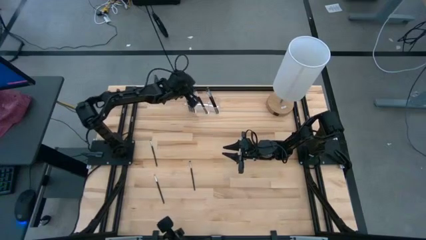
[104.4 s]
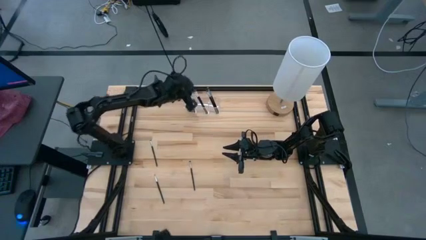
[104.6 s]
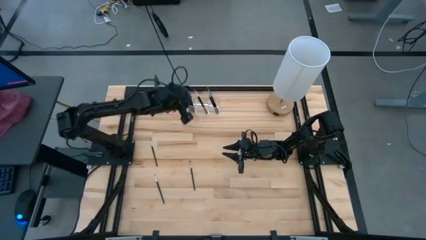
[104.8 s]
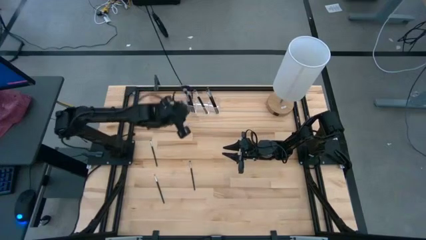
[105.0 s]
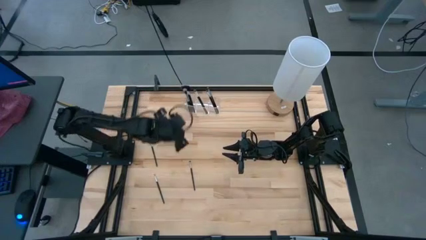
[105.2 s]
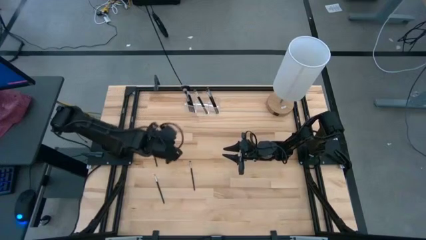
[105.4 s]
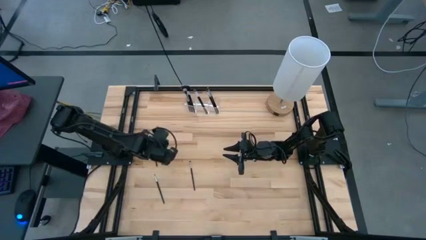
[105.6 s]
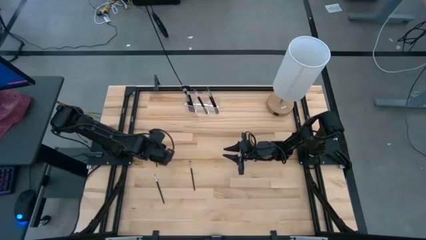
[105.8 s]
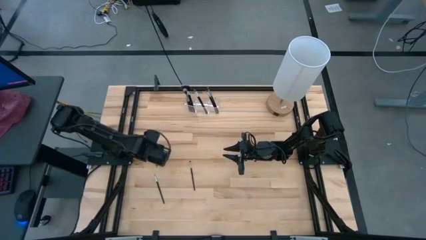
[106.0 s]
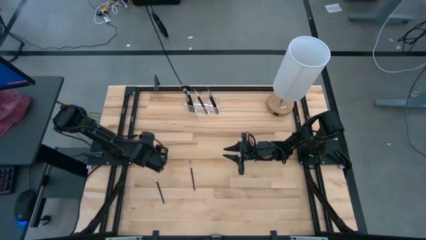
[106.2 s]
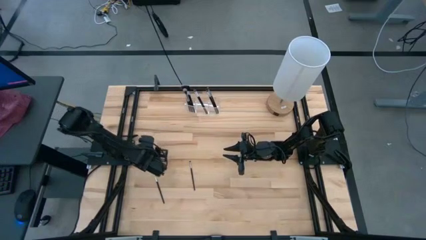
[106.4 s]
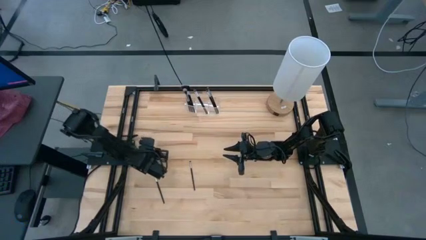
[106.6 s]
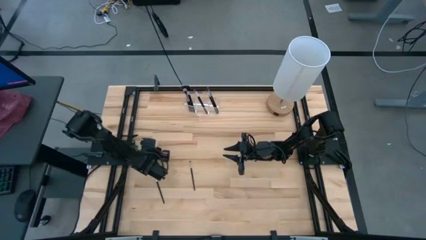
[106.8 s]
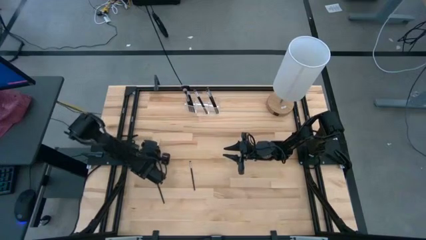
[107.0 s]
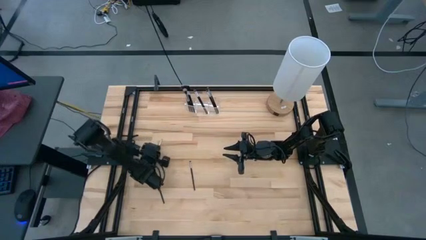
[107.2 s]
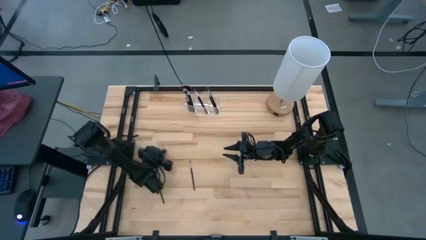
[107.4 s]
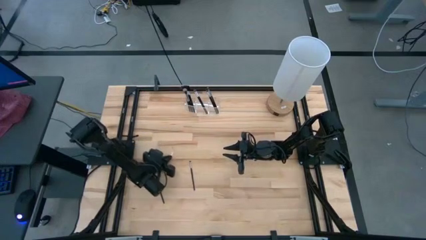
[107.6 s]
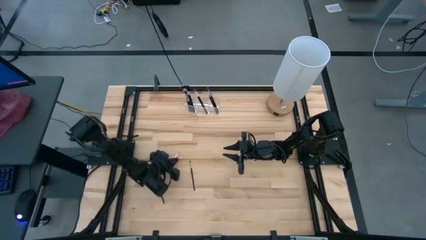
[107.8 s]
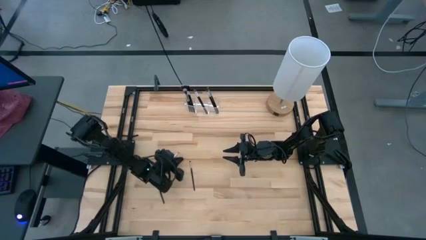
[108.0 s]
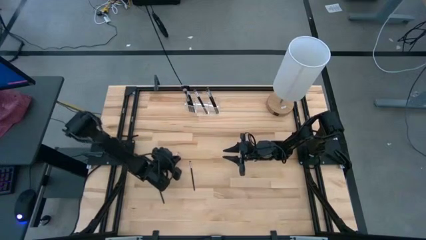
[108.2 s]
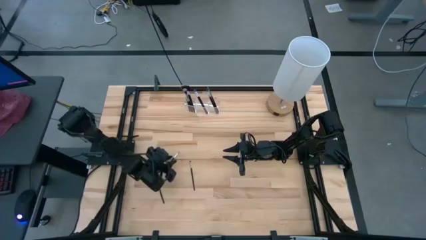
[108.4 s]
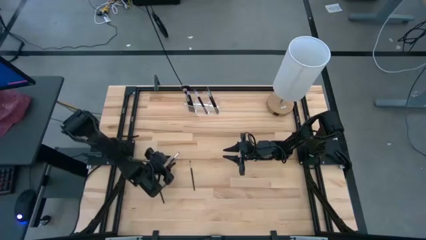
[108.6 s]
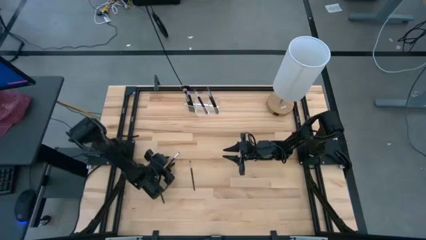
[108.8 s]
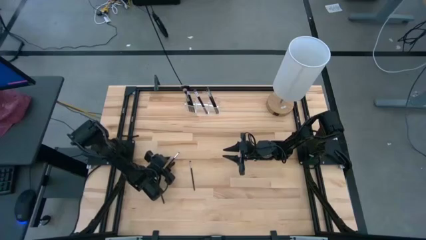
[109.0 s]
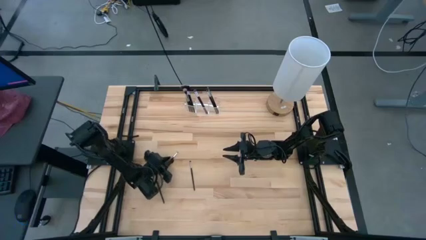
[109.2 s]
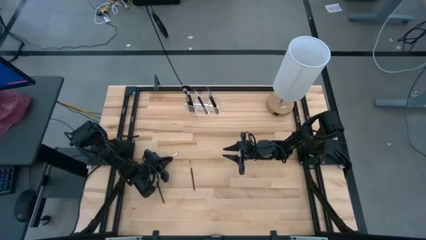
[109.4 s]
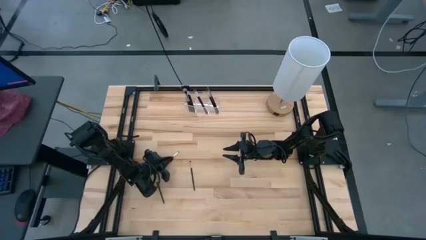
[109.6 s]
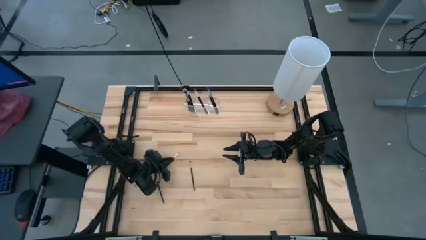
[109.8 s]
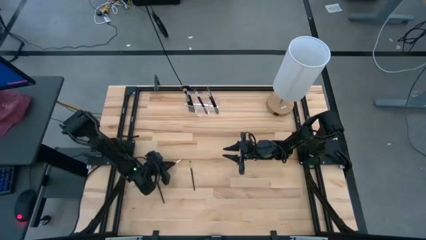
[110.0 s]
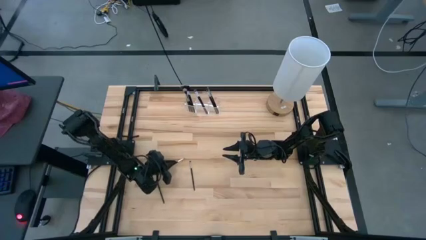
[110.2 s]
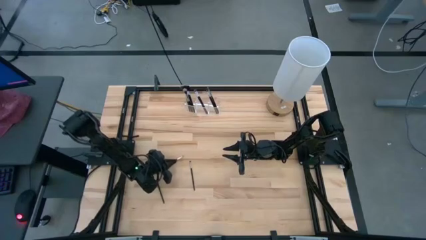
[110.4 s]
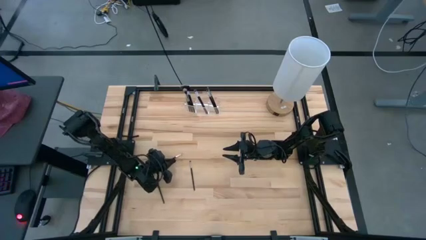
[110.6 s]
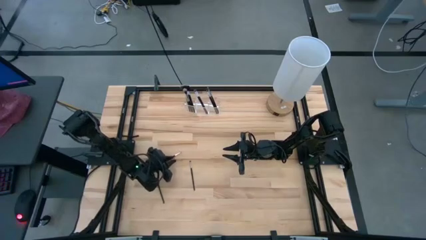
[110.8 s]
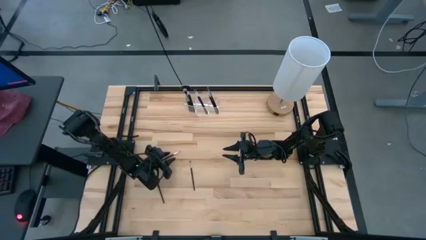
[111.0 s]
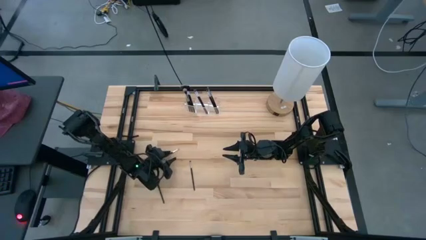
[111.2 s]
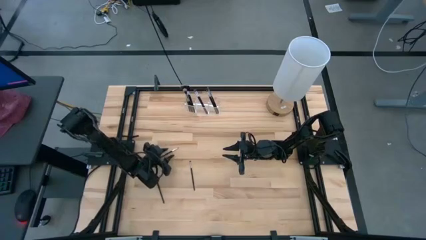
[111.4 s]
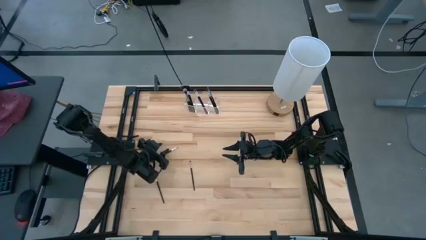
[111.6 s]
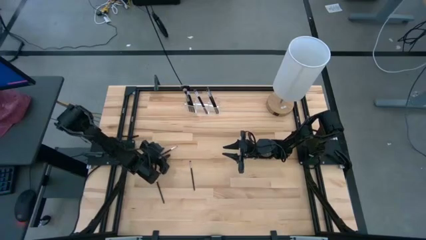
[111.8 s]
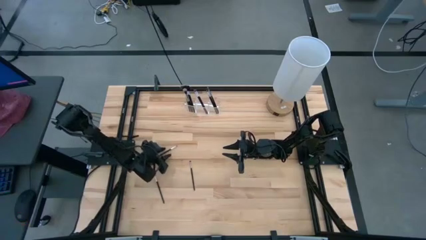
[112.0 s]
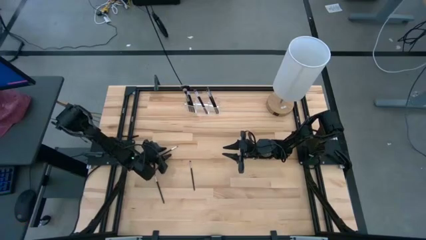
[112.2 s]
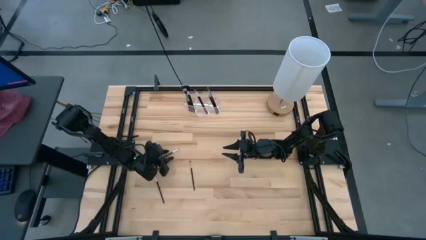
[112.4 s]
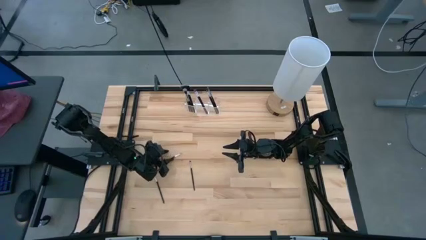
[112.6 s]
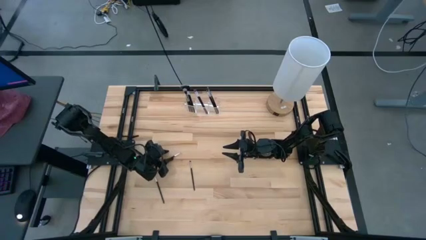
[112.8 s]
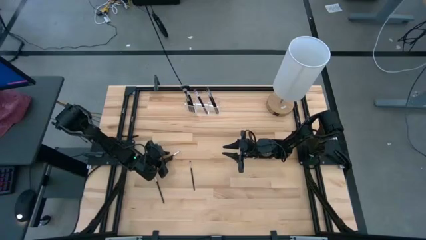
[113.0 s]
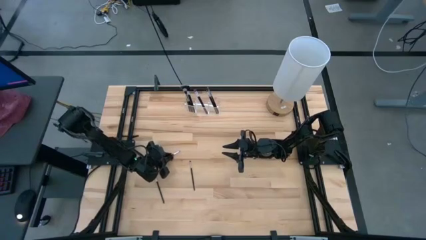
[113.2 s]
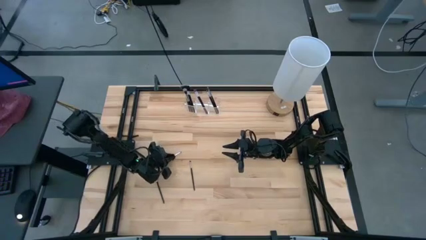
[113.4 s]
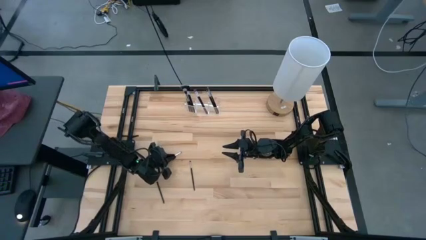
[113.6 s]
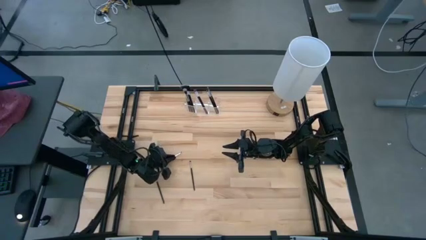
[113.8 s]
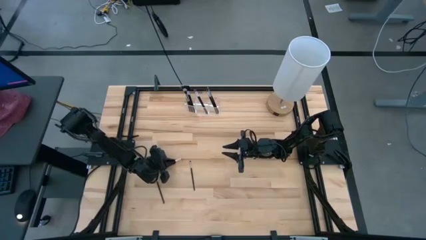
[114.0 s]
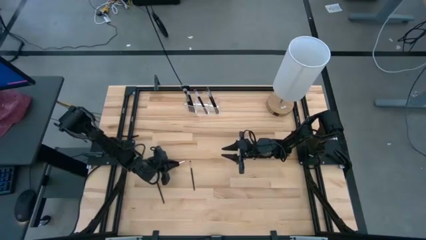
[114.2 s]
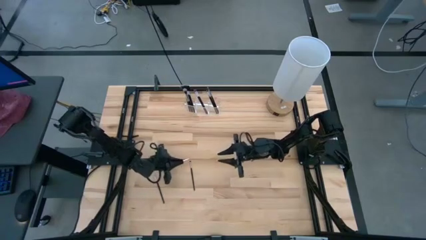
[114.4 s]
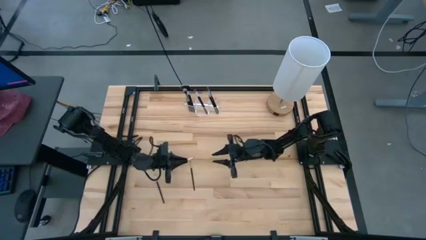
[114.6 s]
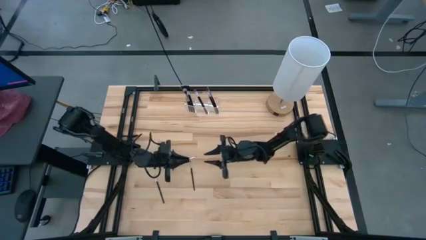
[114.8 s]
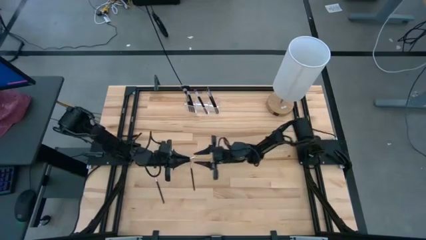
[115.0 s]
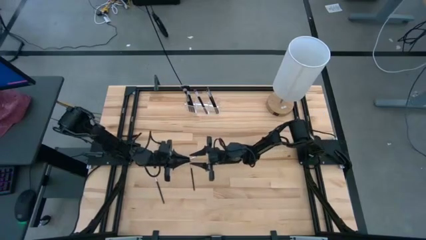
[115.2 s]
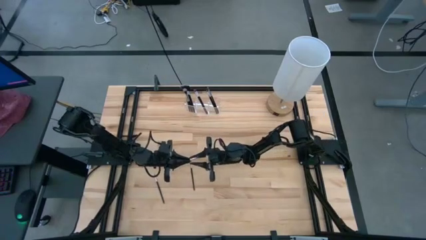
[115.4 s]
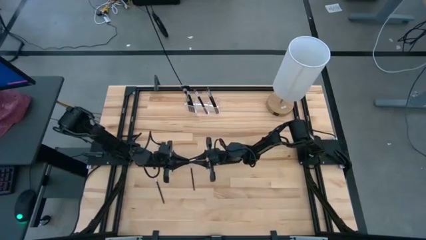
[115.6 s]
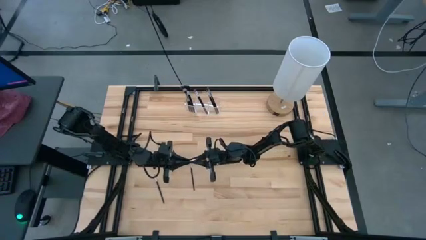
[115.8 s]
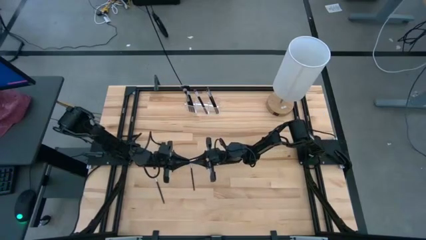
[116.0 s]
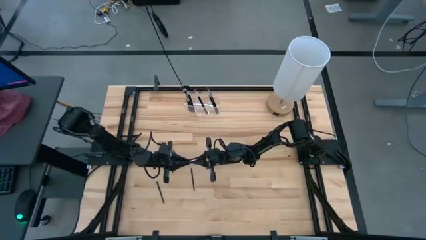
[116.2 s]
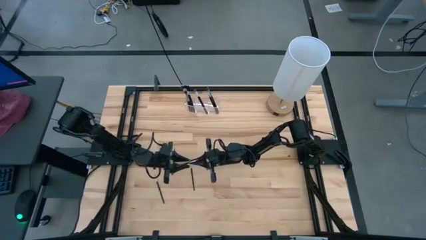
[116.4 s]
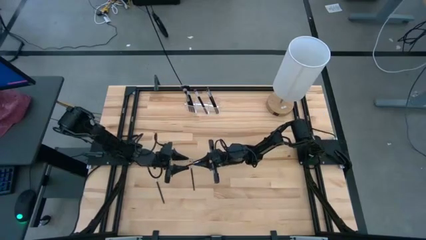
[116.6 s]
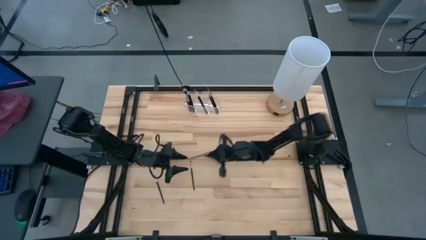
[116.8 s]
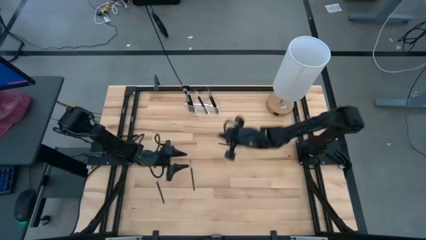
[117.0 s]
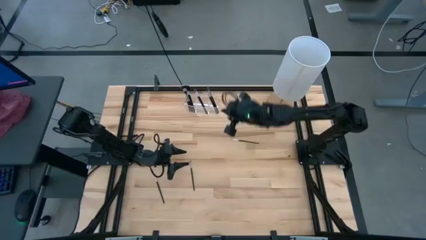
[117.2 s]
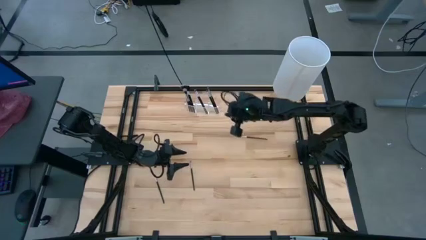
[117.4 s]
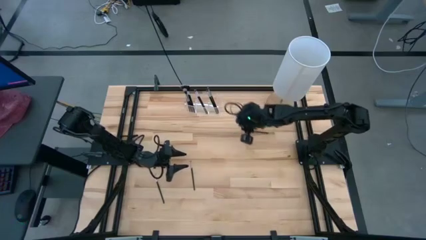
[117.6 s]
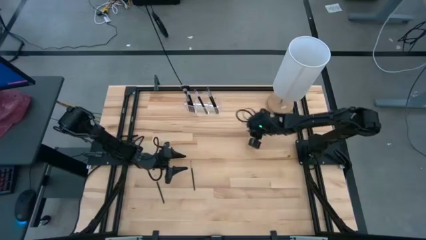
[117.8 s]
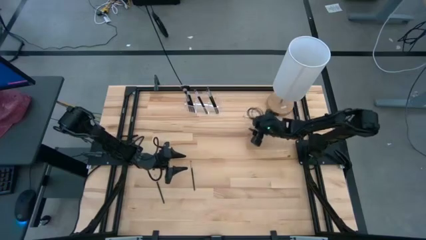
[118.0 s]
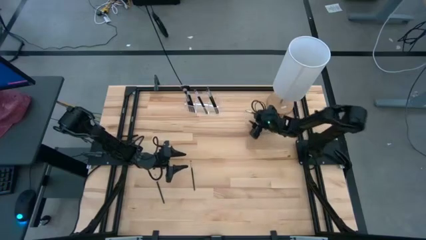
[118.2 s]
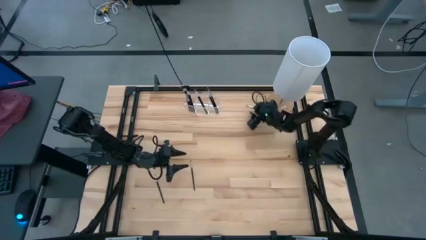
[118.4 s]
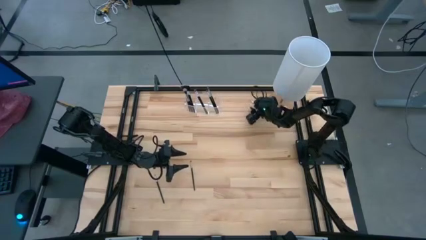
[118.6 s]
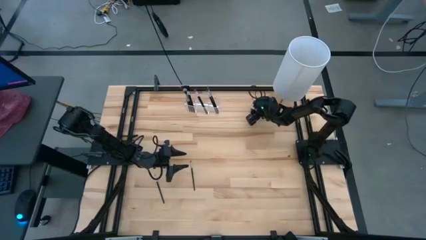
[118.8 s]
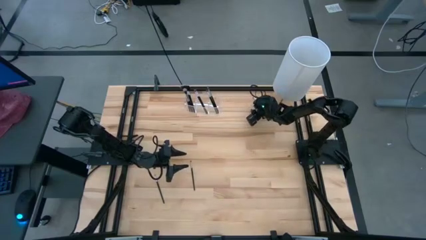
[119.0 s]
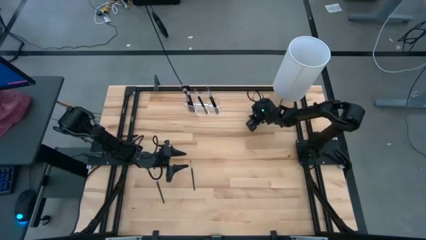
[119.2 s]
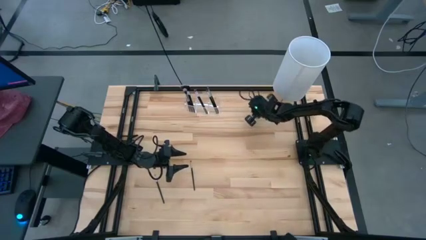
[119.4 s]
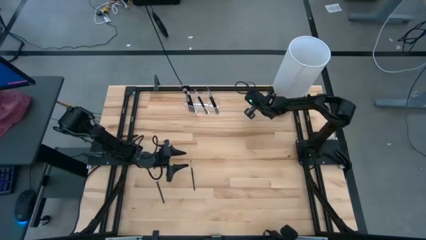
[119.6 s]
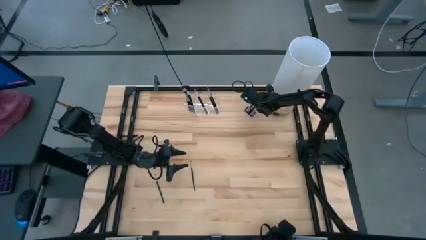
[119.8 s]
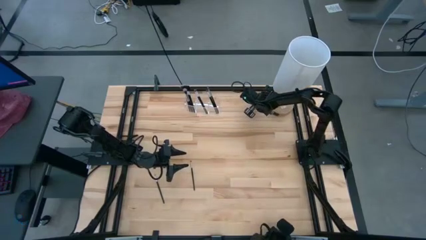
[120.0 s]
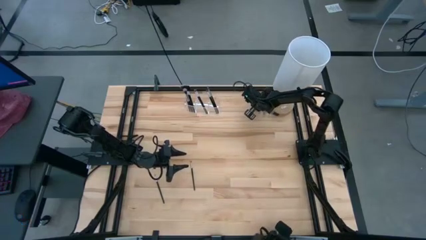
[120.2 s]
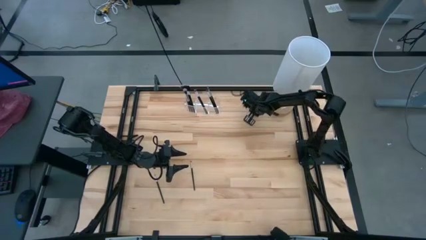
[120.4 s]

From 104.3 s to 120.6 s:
Task: Put items in baskets/containers
Put the black eyeshadow brush into the transparent organizer

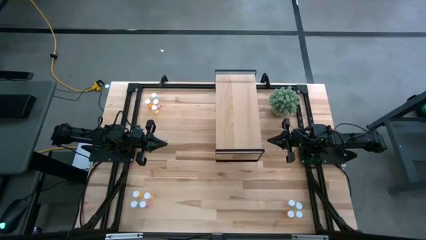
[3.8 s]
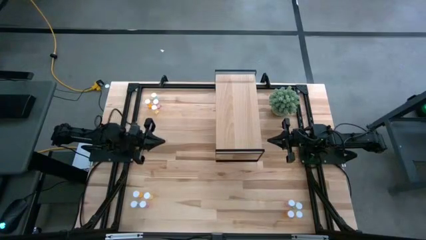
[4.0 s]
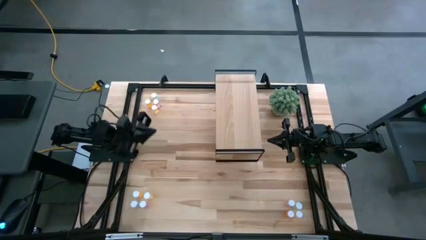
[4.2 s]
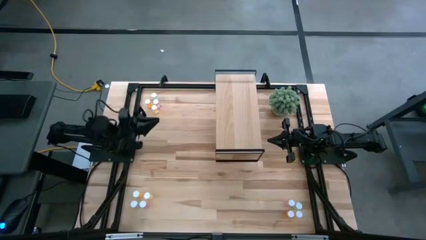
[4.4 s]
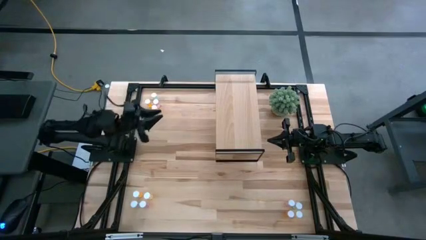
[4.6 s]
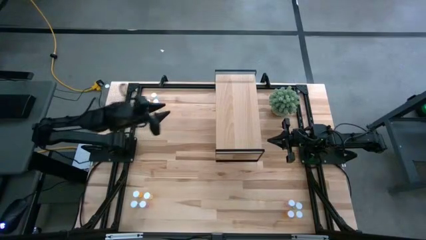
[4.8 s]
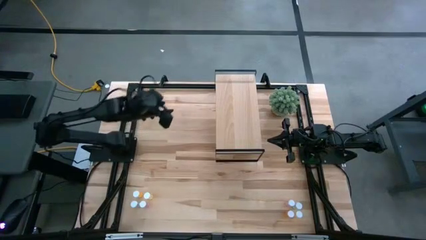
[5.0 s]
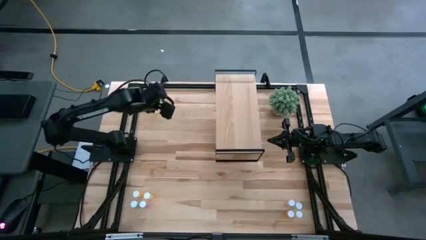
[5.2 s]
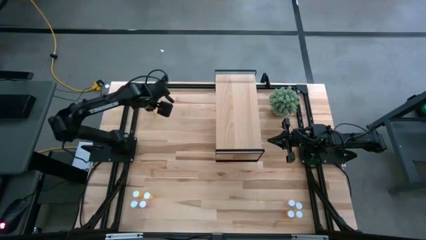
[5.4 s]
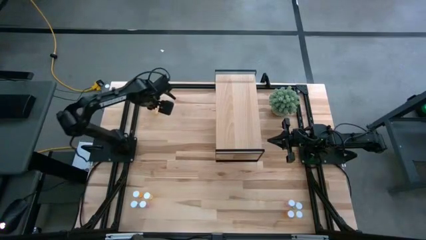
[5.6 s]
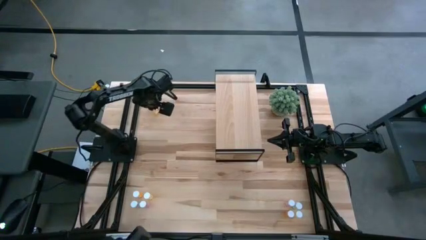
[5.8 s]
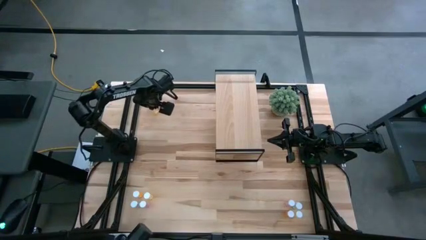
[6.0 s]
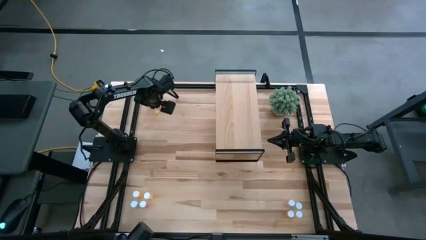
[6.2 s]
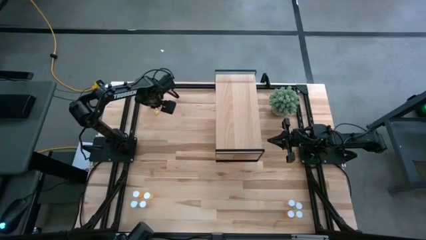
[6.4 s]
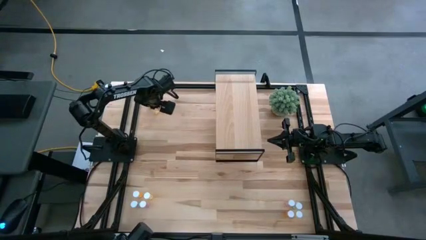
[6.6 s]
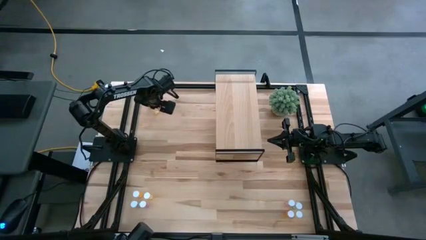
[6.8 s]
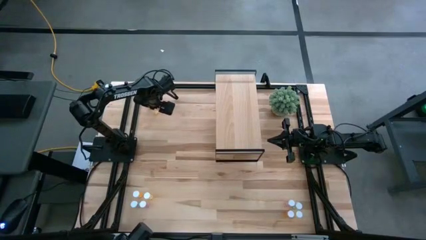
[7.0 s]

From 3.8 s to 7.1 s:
Task: Pick and place medicine bottles onto shelf by color
Put the top yellow pill bottle on the shelf
